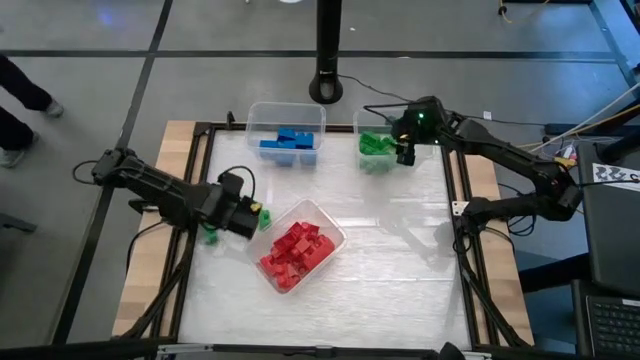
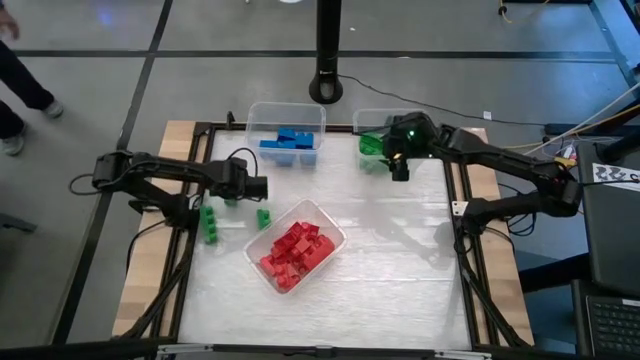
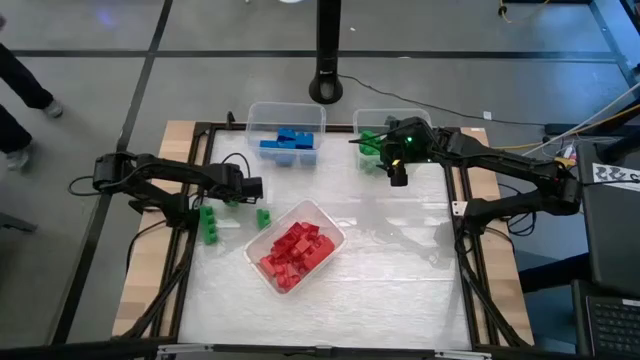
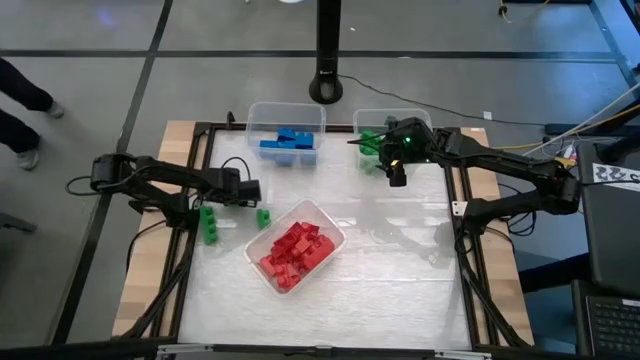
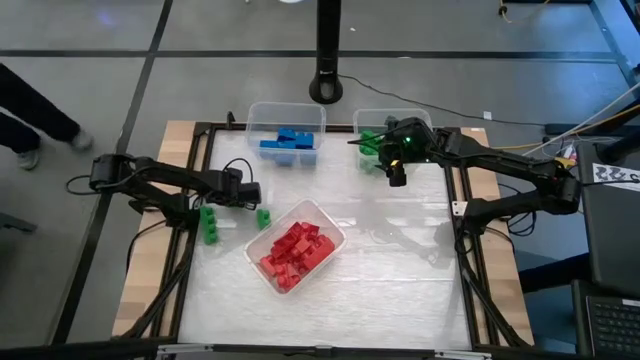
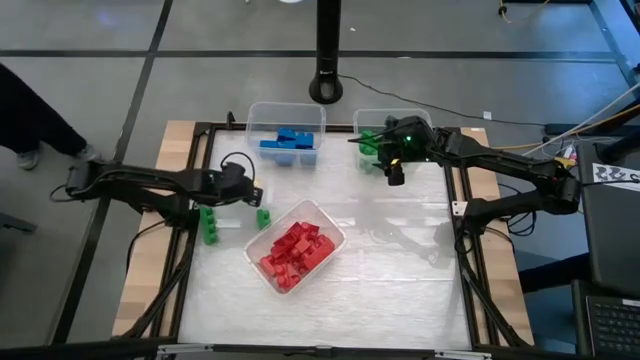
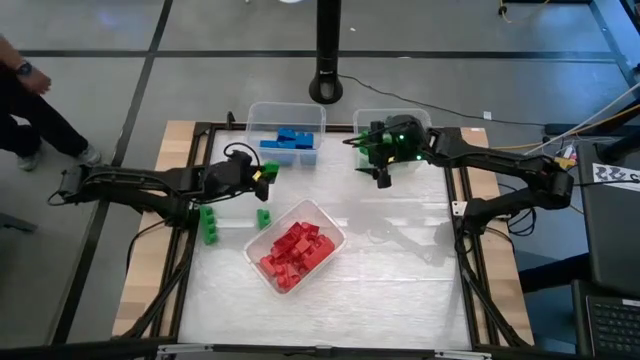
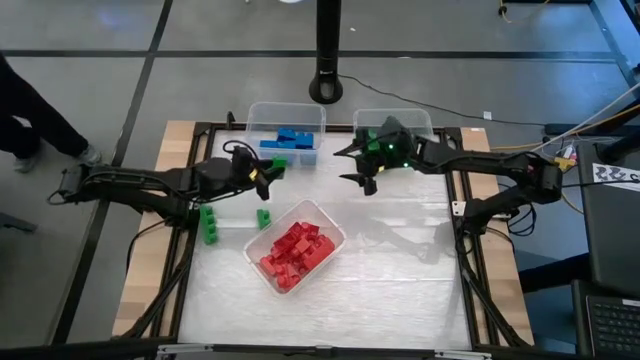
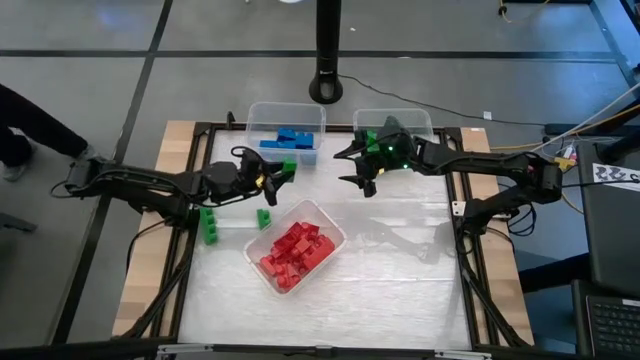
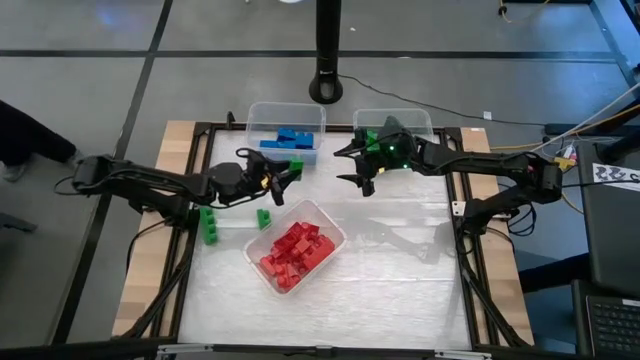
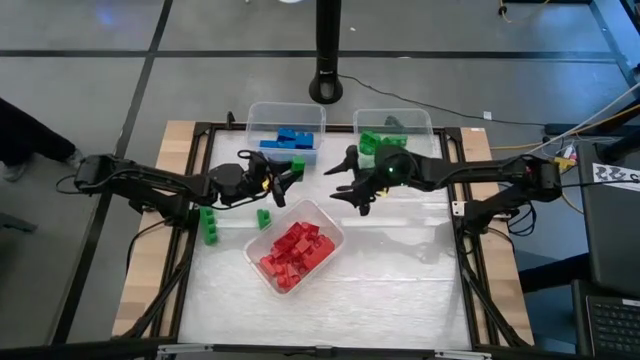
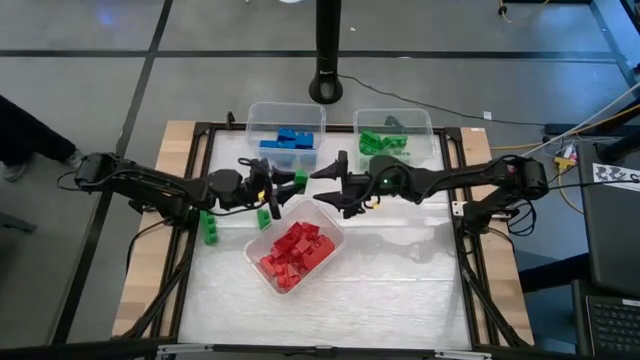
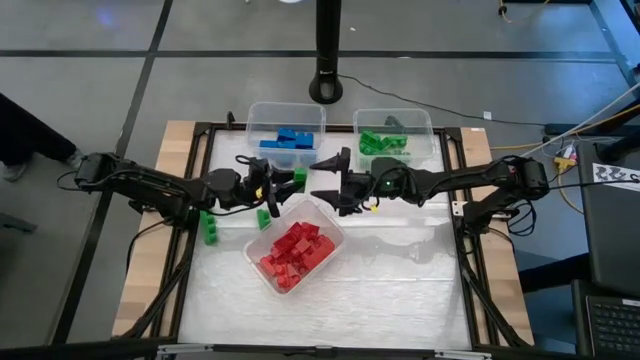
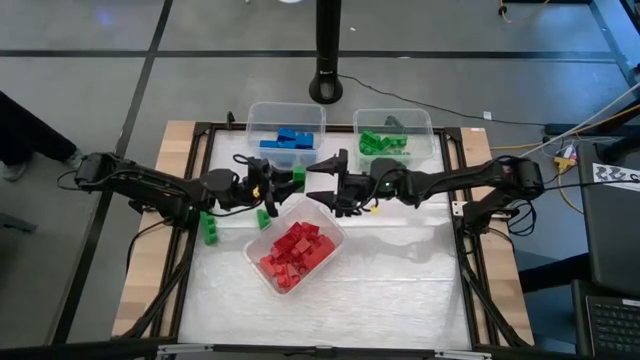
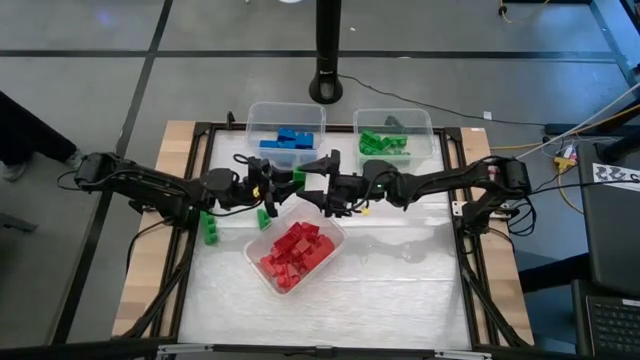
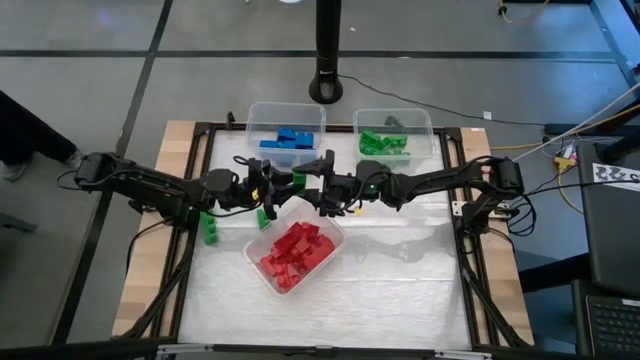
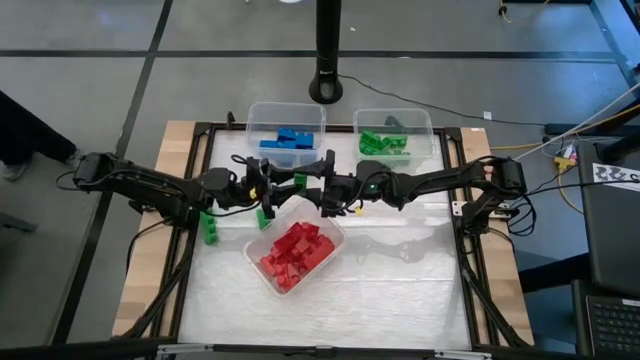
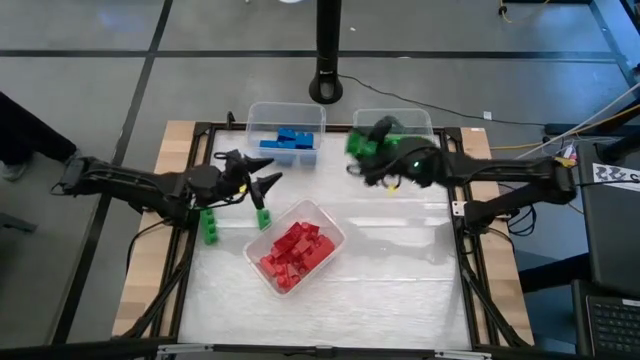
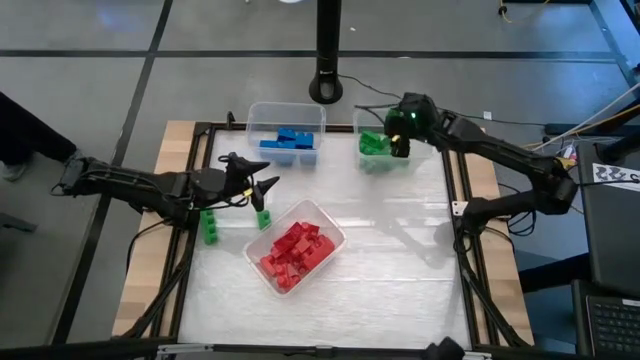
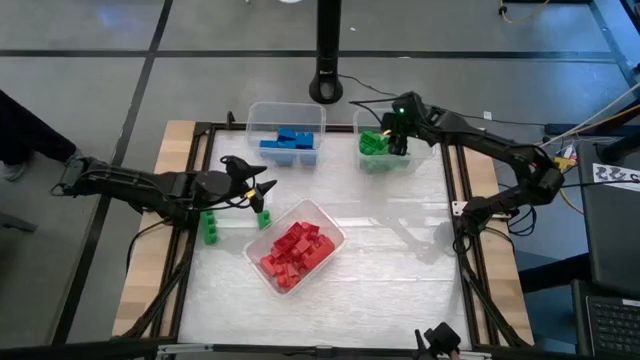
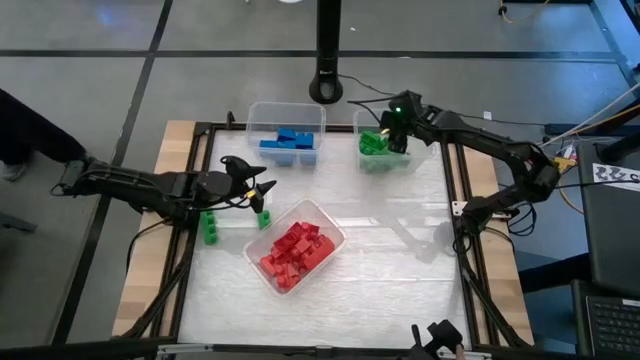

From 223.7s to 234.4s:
Task: Sort blocks
Put the green game piece into the top right transparent bin

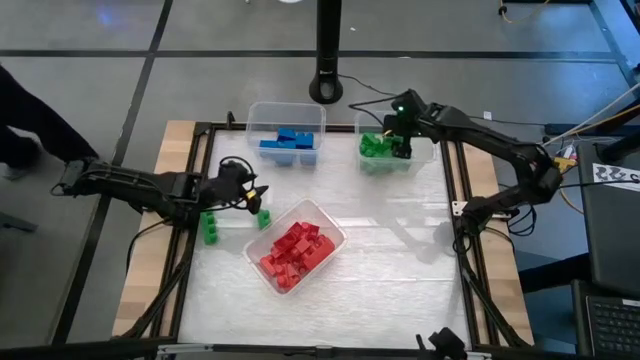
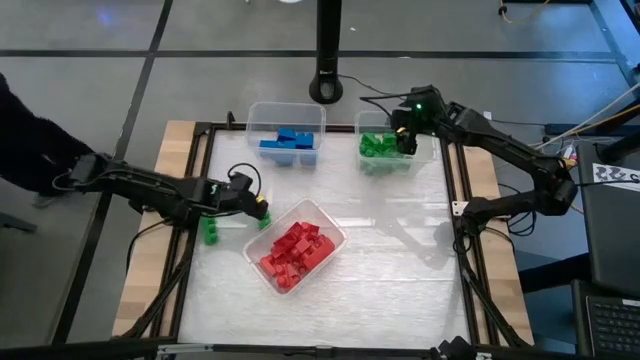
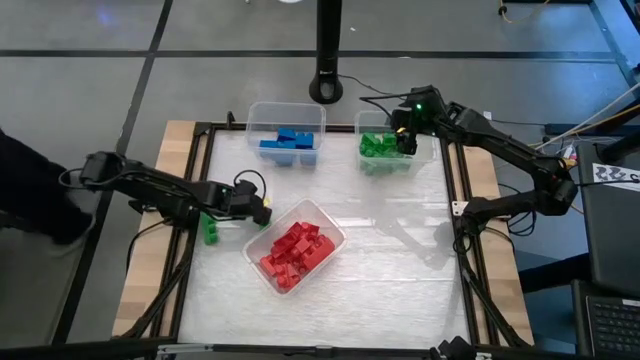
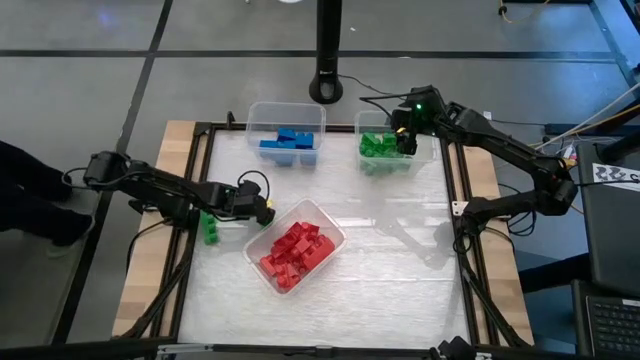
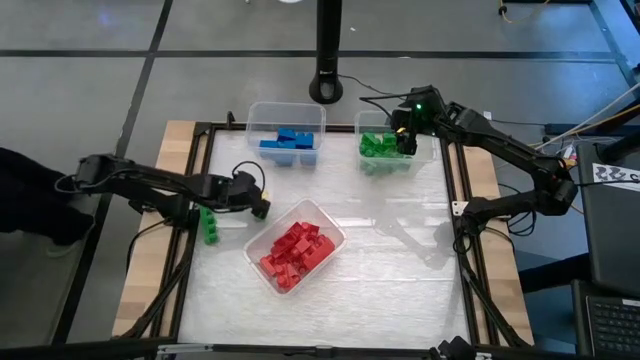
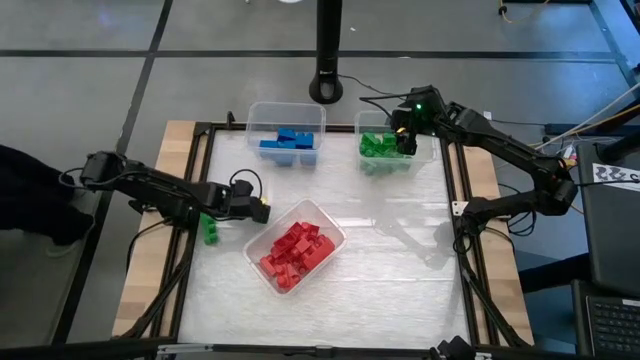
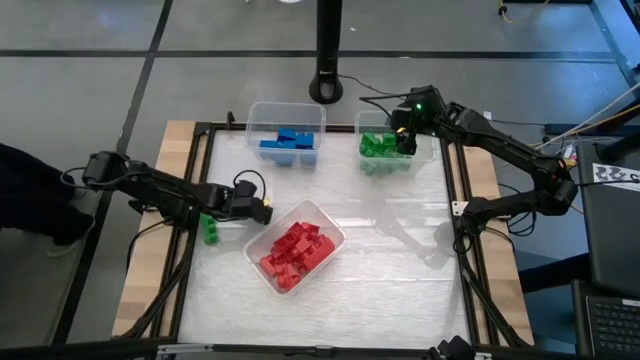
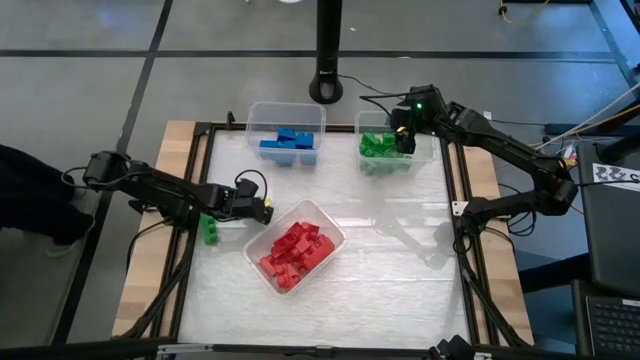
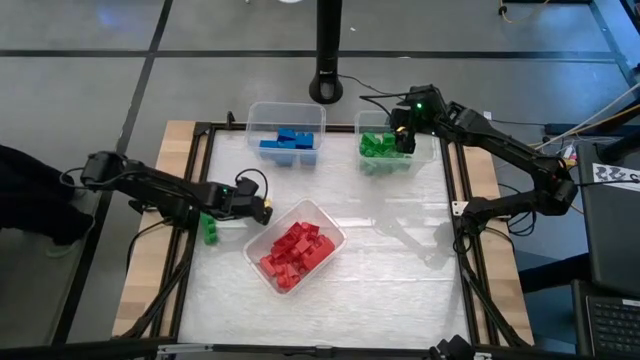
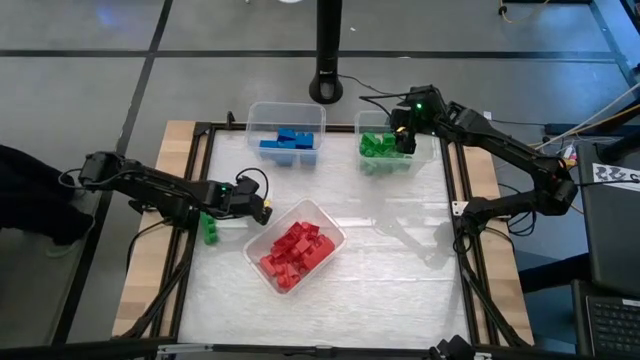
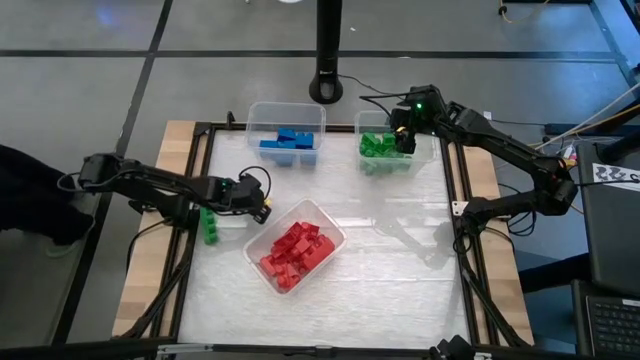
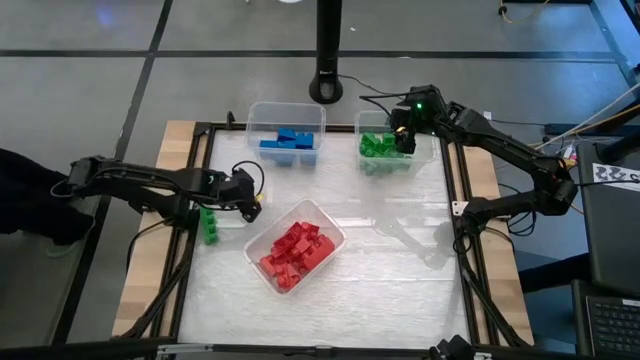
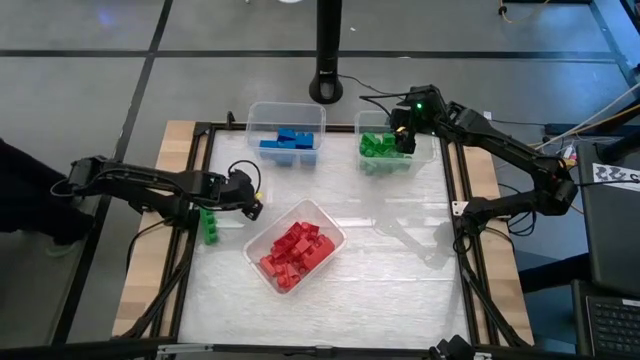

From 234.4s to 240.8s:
Put the green game piece into the top right transparent bin

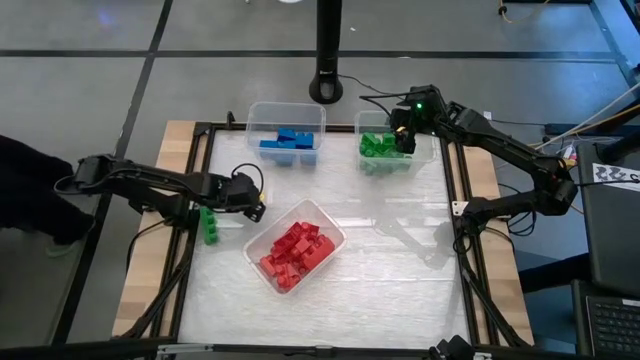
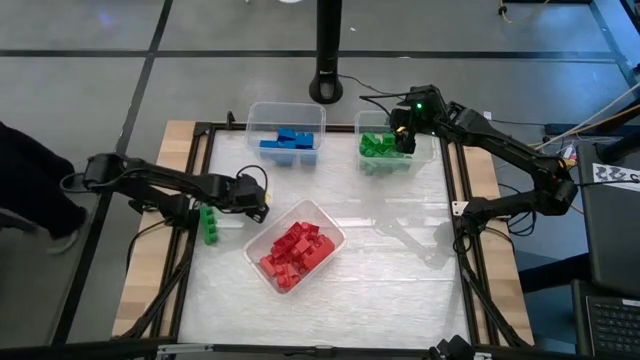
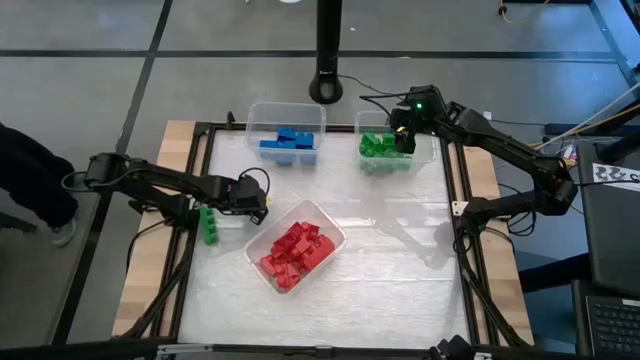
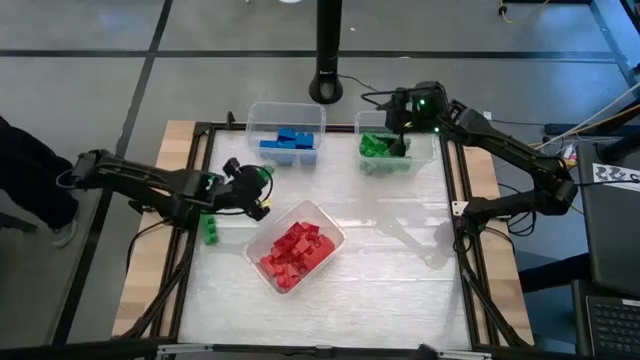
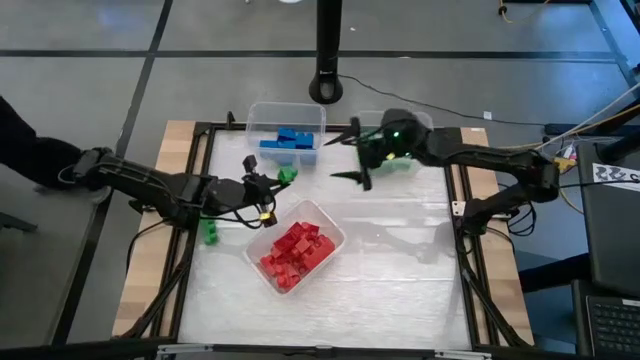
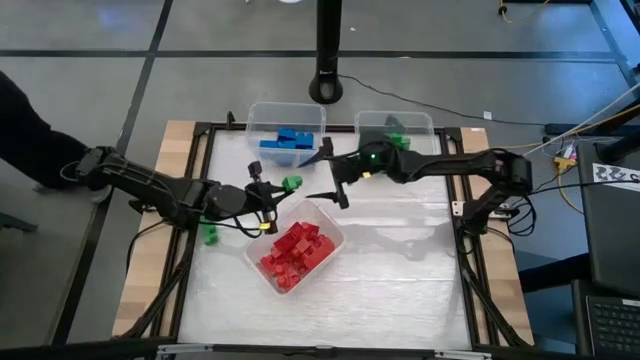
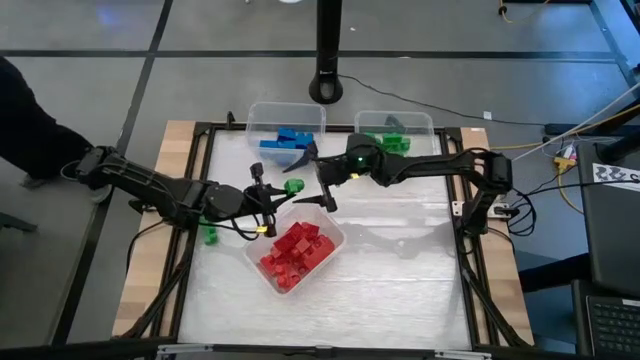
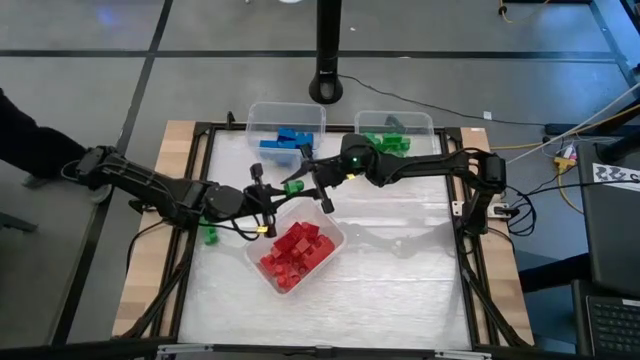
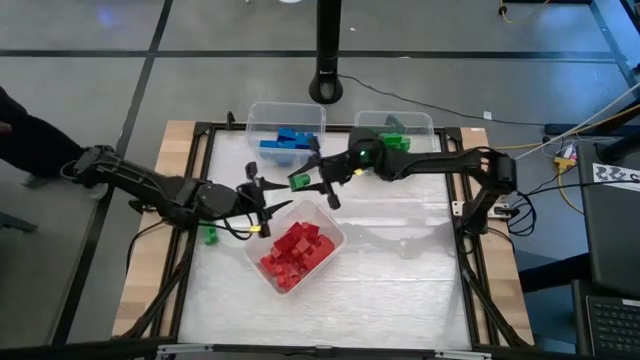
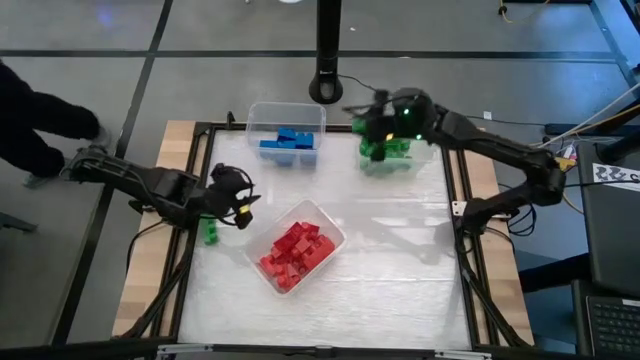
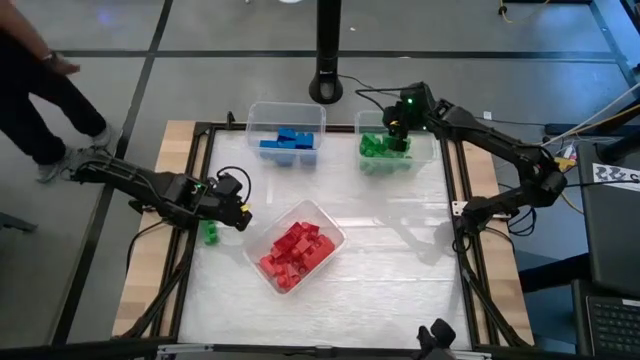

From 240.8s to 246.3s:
Put the green game piece into the top right transparent bin
